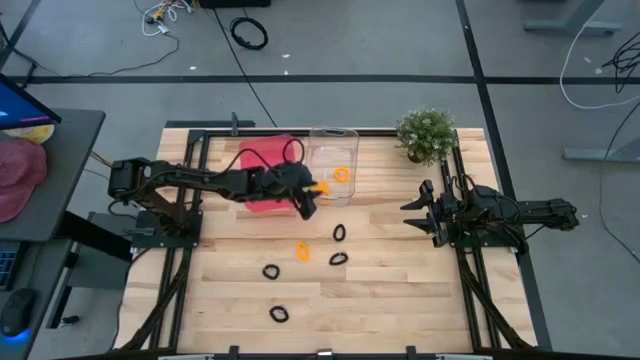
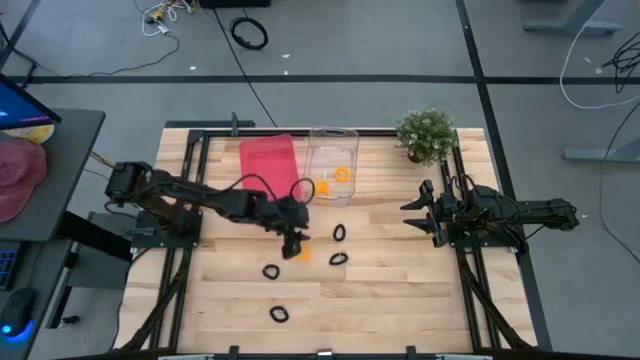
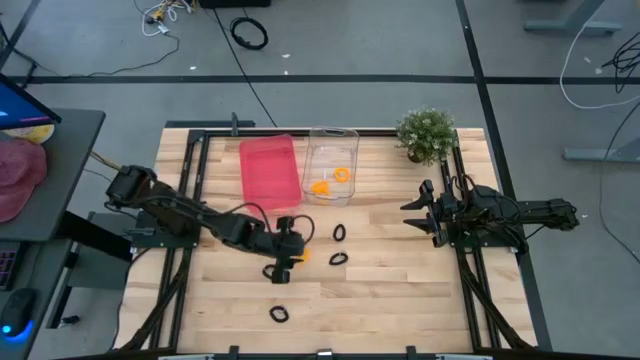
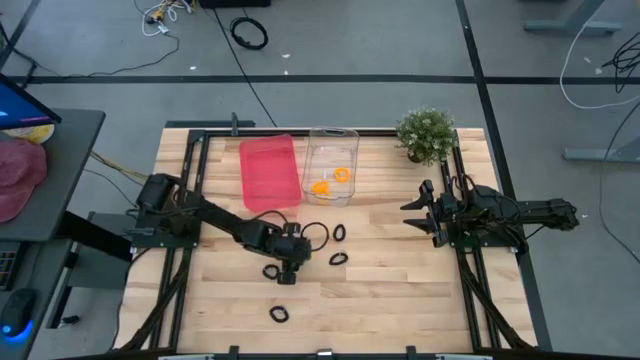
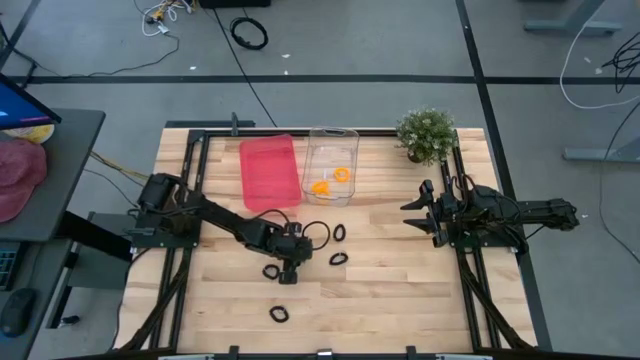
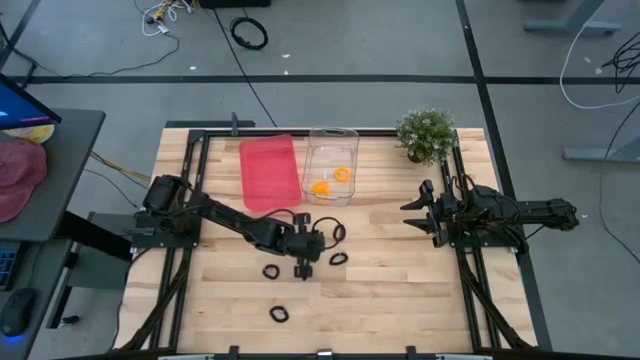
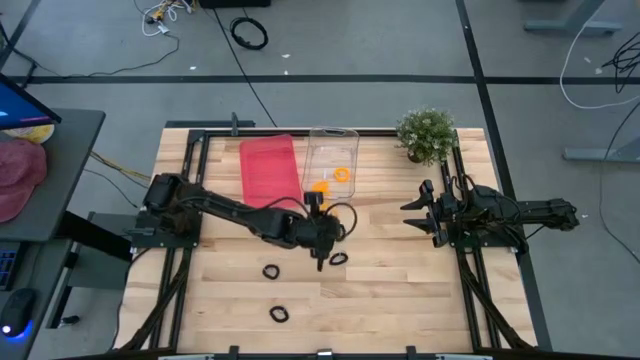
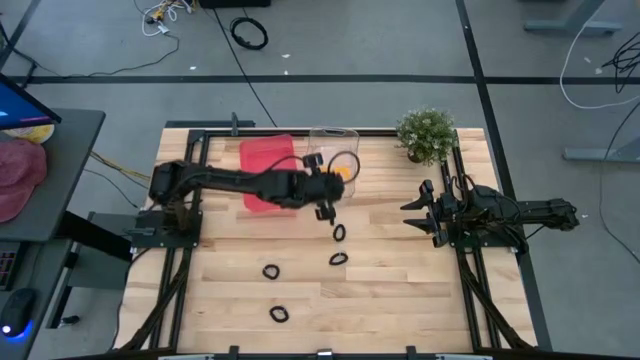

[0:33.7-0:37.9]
Task: Sort spring keychains
Put the yellow spring keychain into the transparent bin

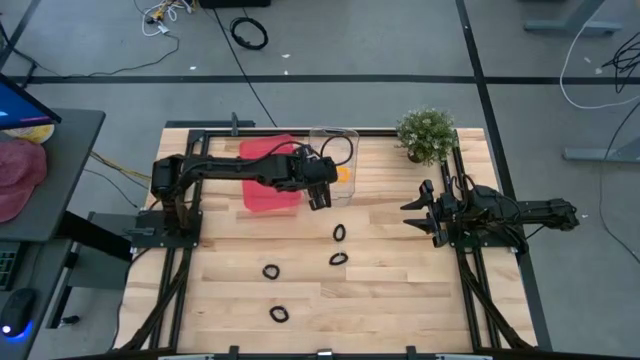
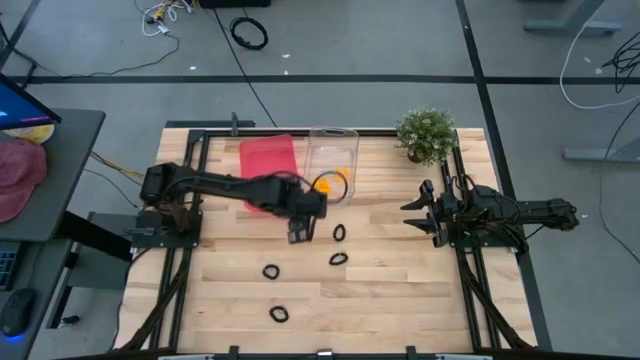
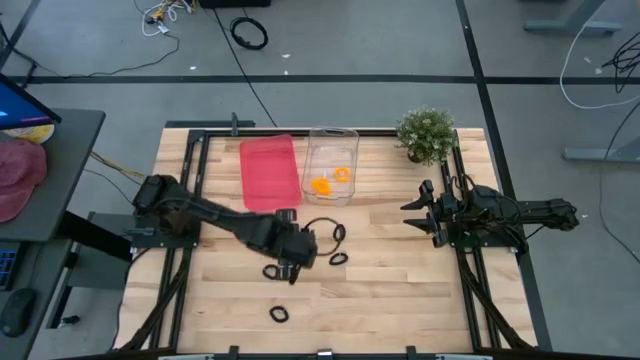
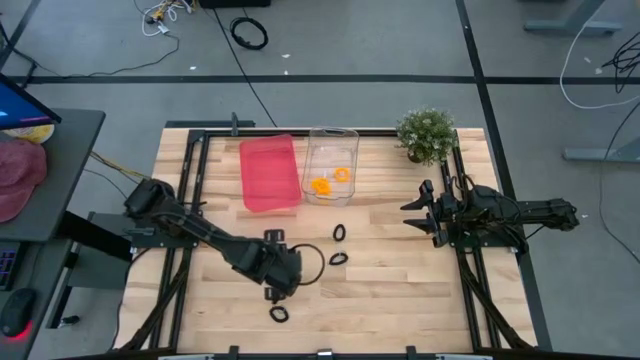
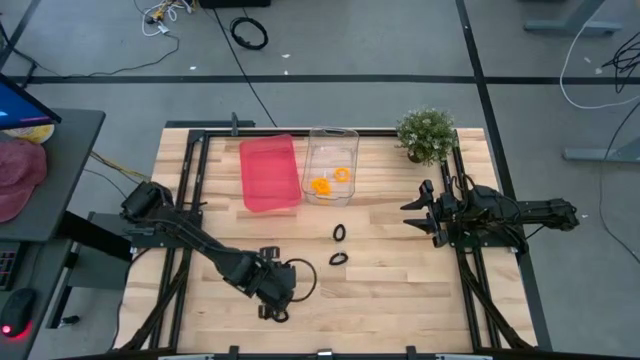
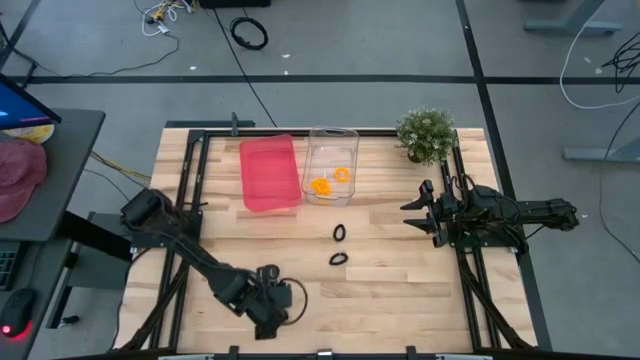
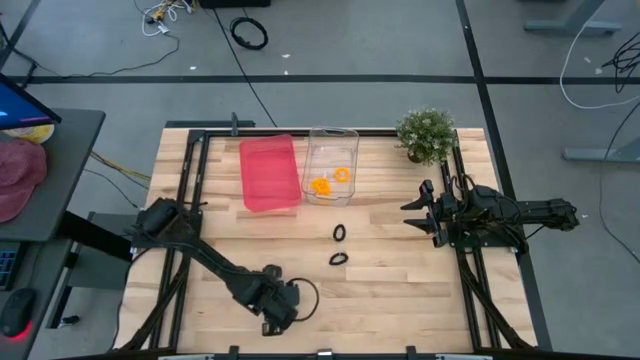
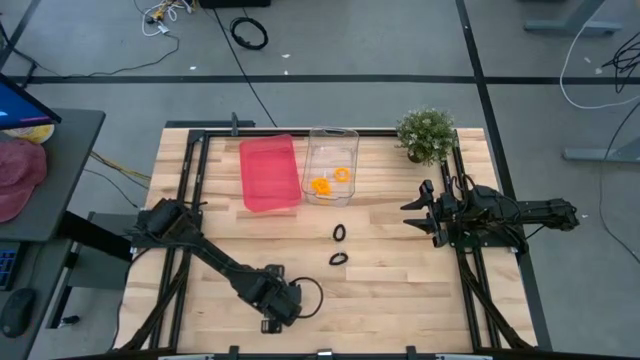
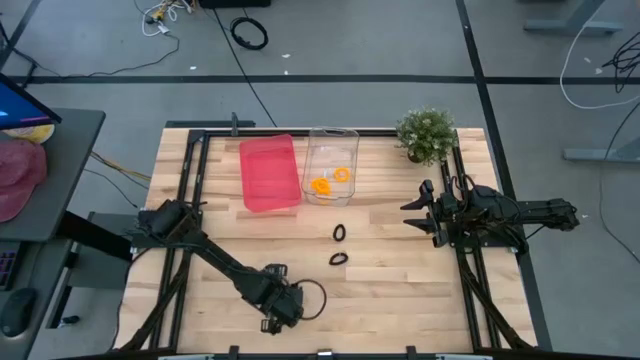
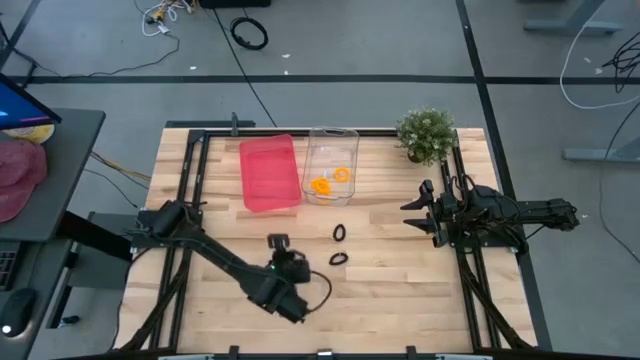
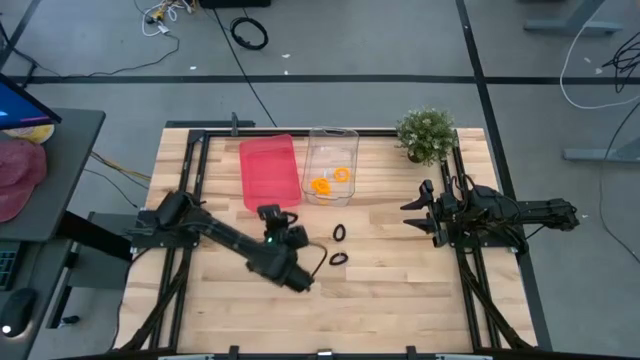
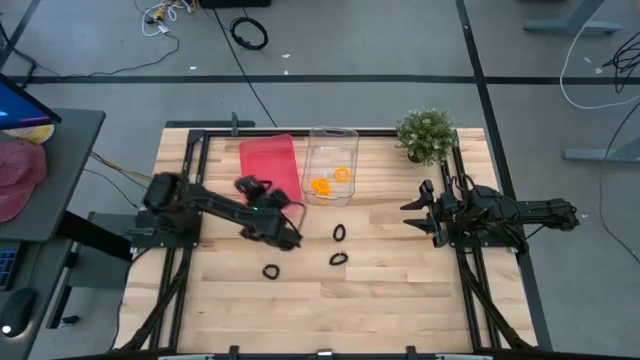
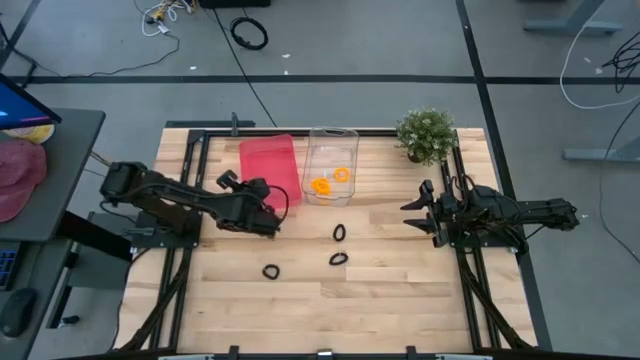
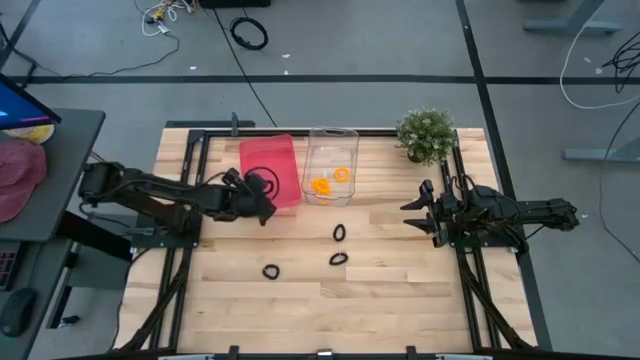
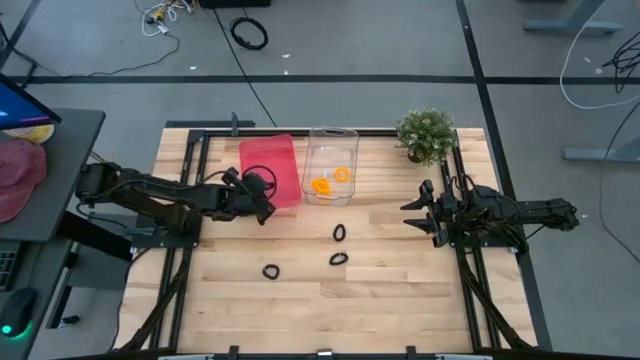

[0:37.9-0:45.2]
Put the black spring keychain into the red bin

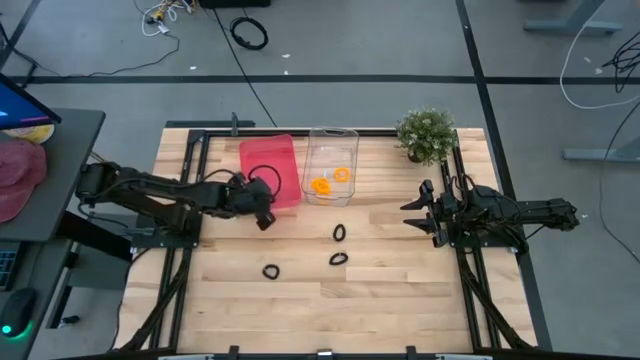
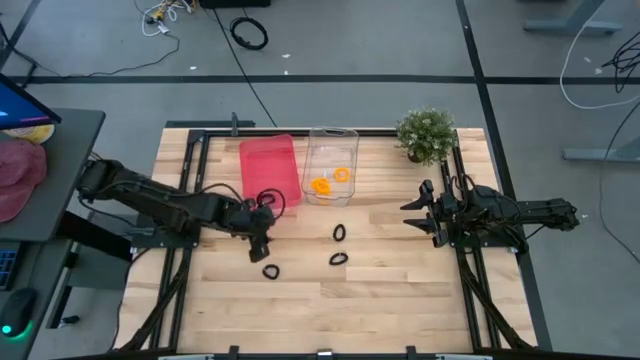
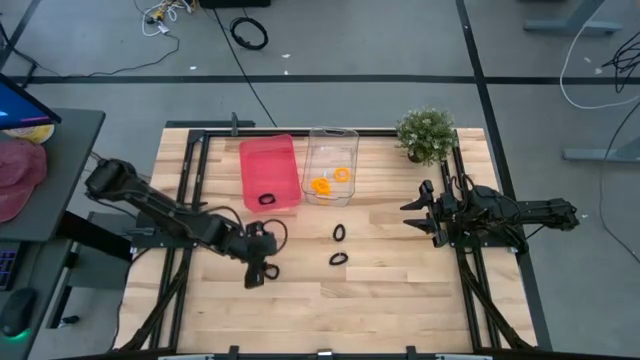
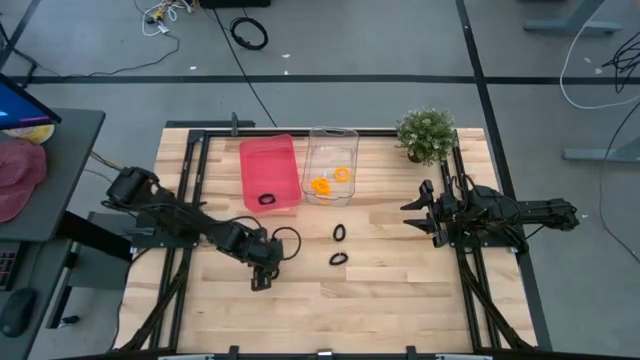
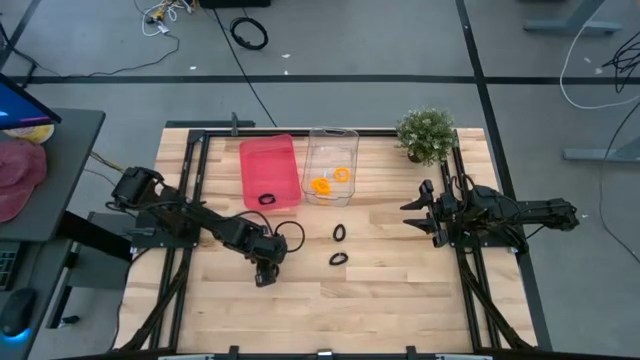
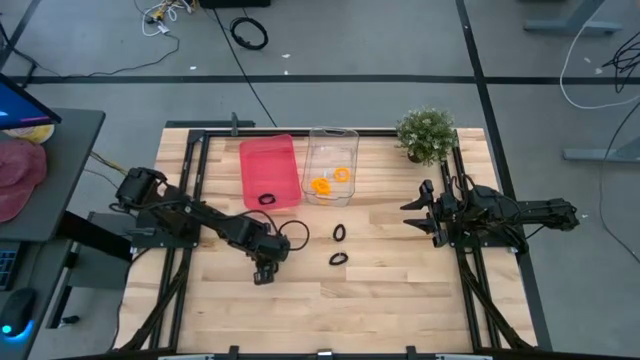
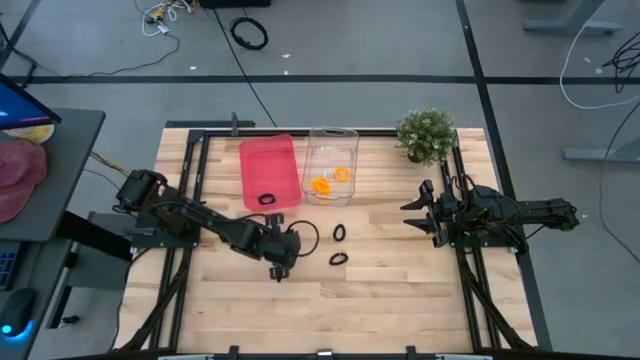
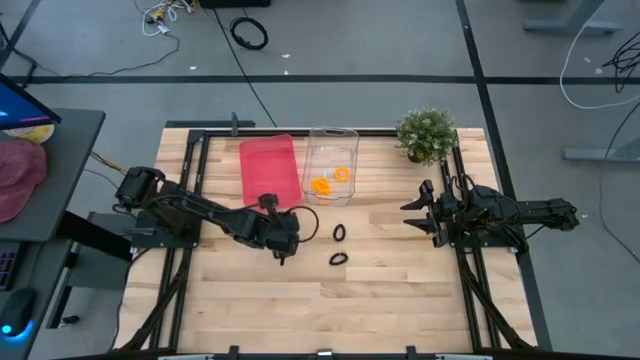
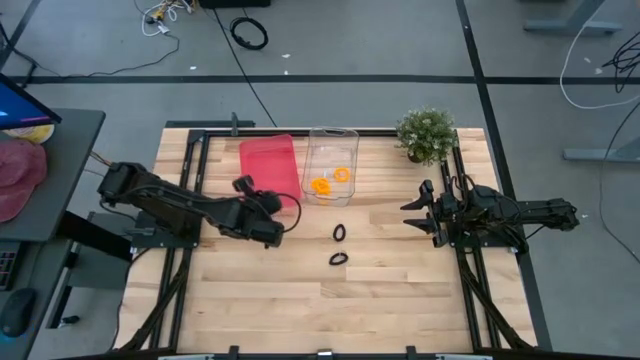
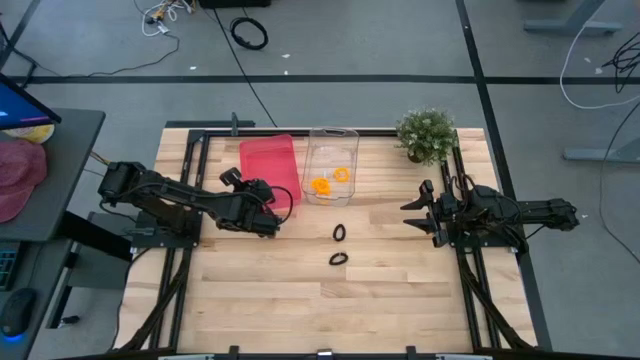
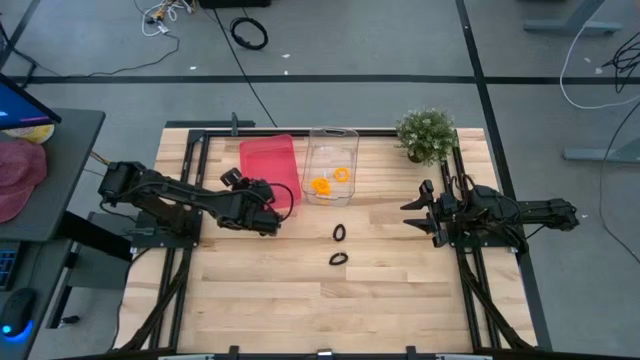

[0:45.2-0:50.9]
Put the black spring keychain into the red bin

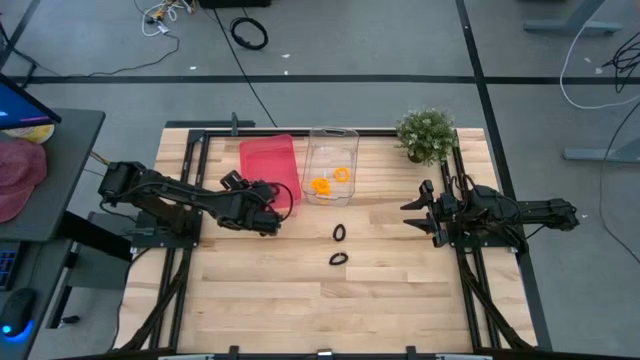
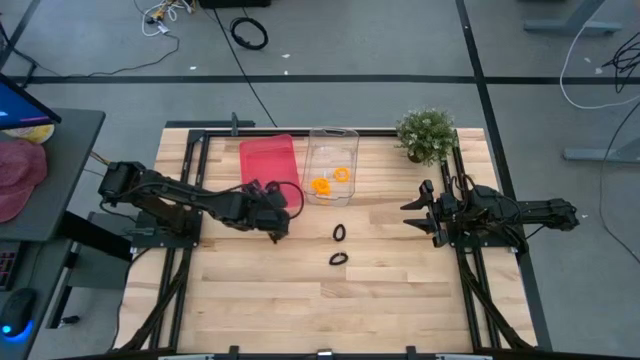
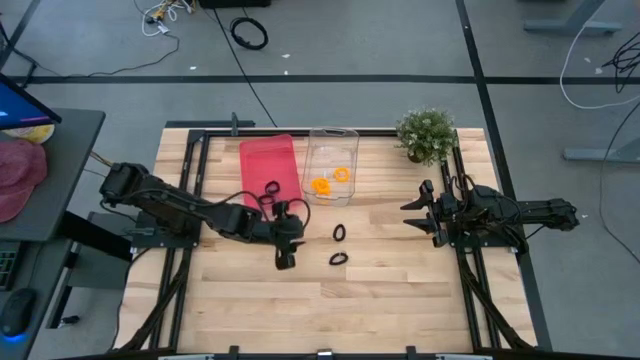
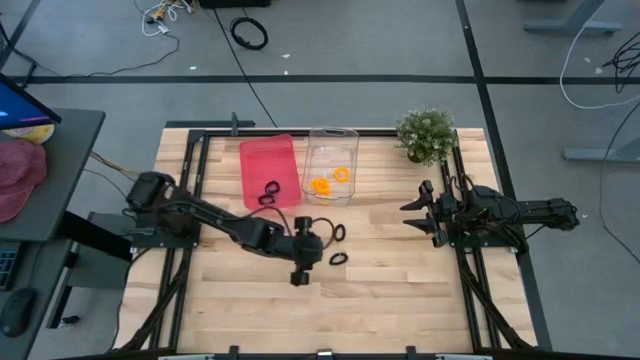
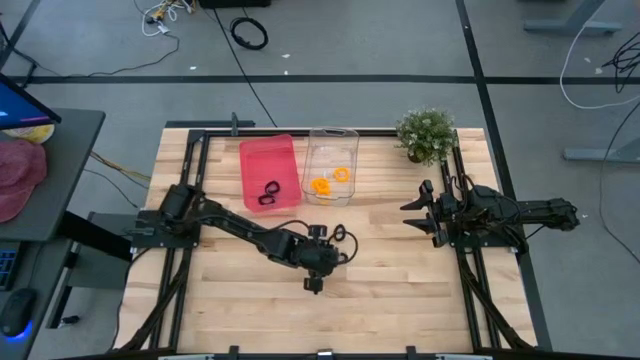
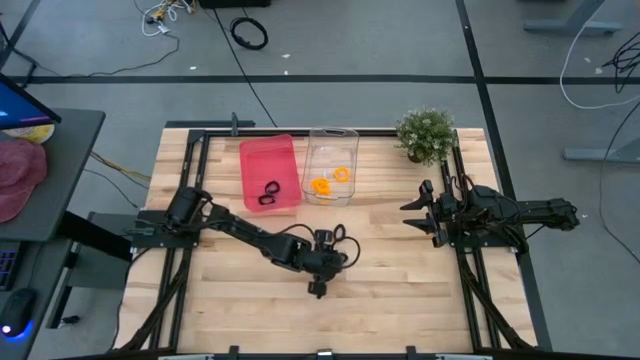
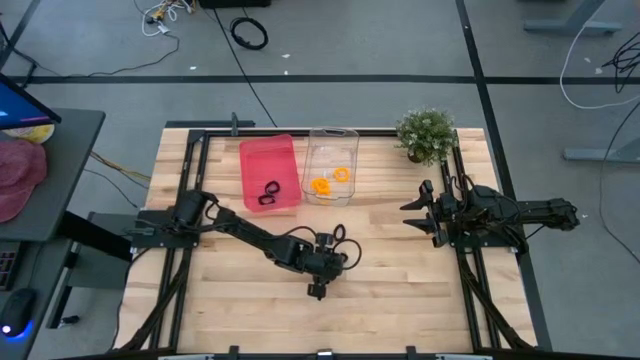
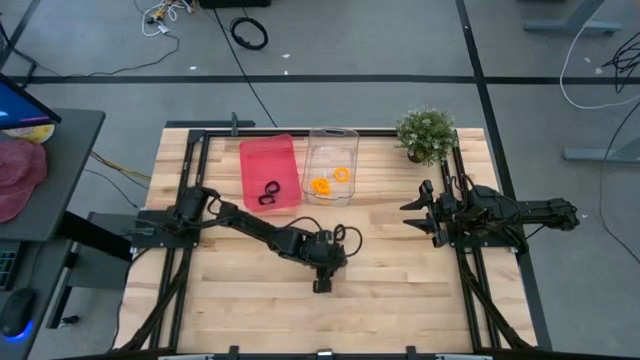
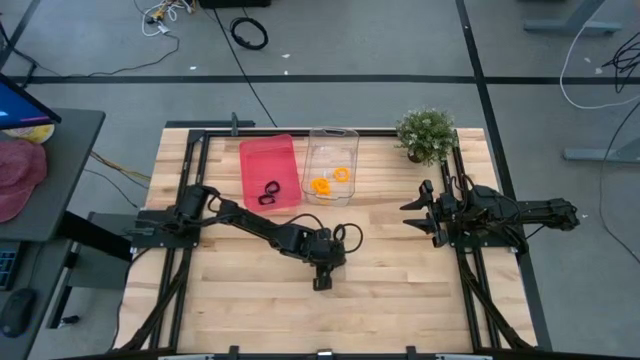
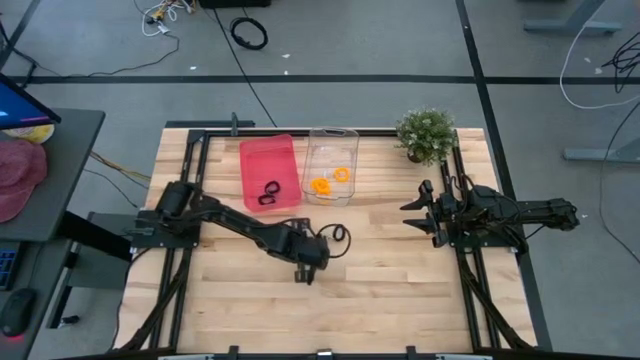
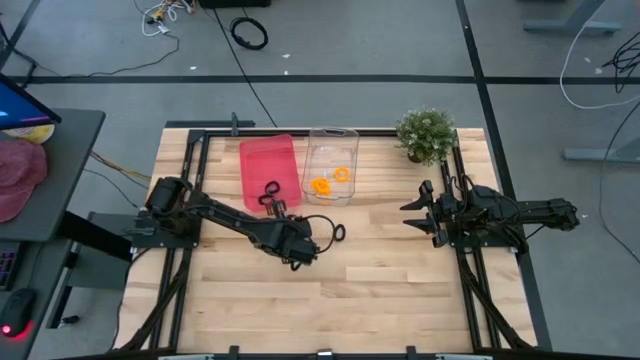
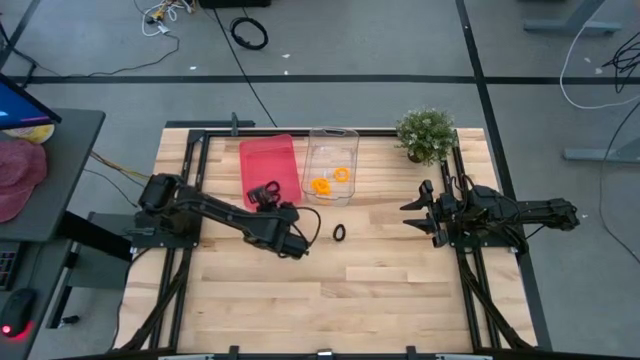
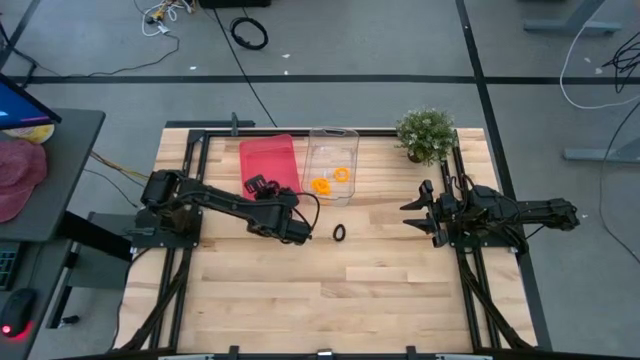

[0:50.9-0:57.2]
Put the black spring keychain into the red bin
